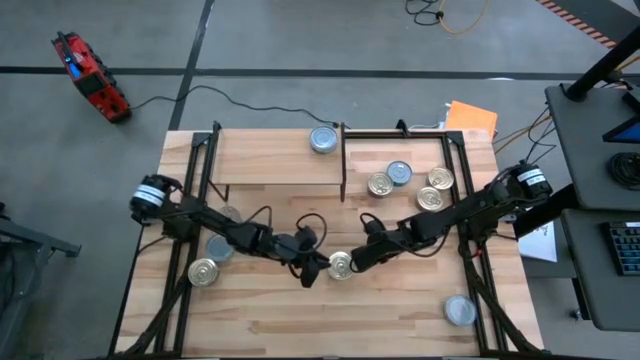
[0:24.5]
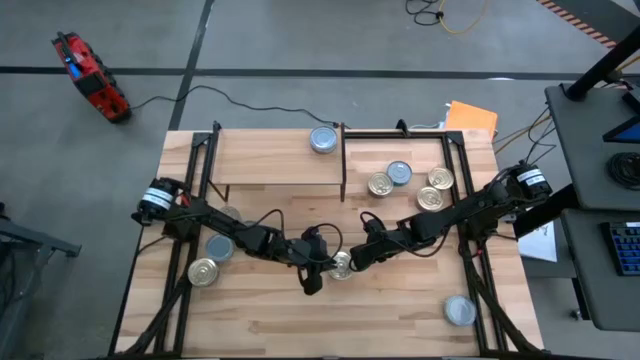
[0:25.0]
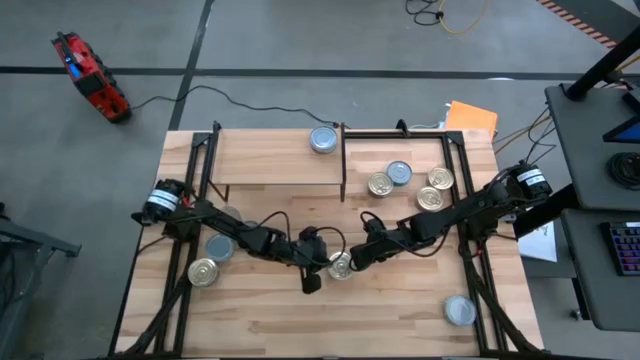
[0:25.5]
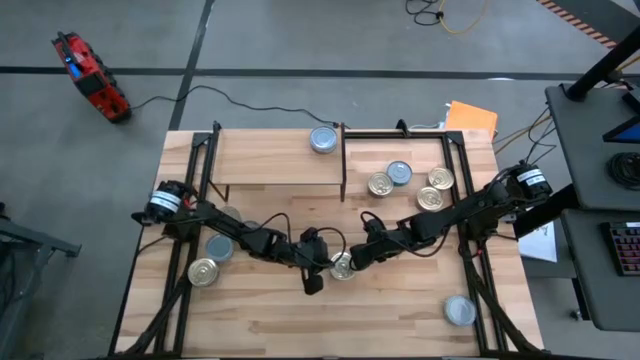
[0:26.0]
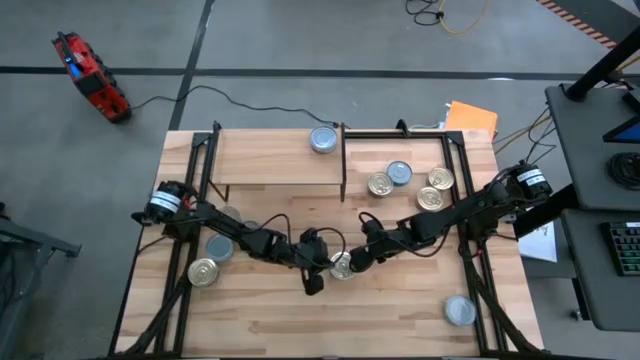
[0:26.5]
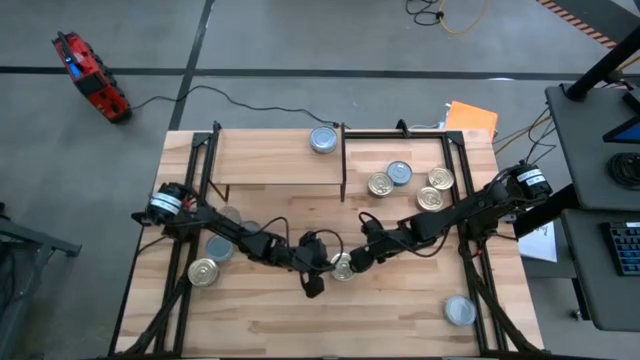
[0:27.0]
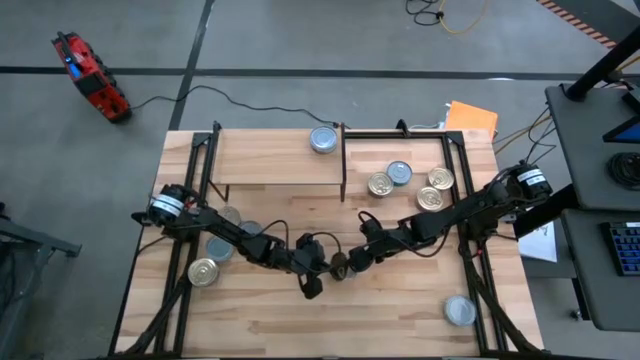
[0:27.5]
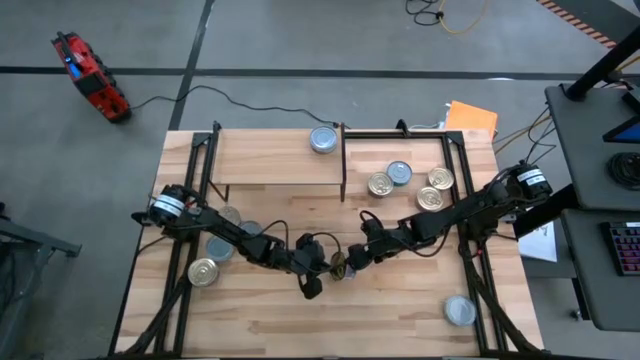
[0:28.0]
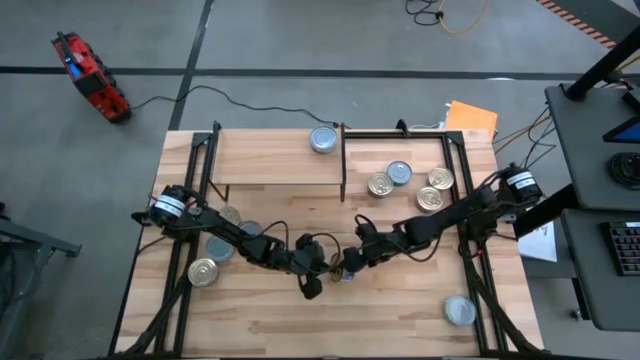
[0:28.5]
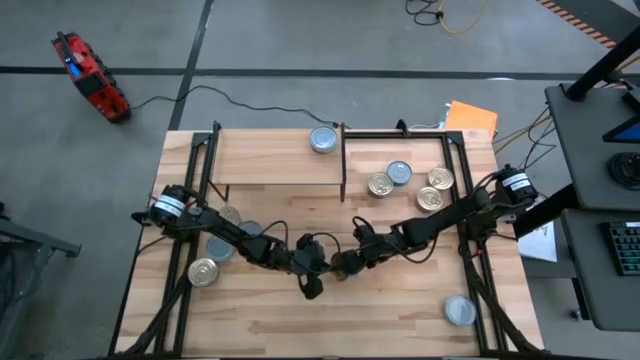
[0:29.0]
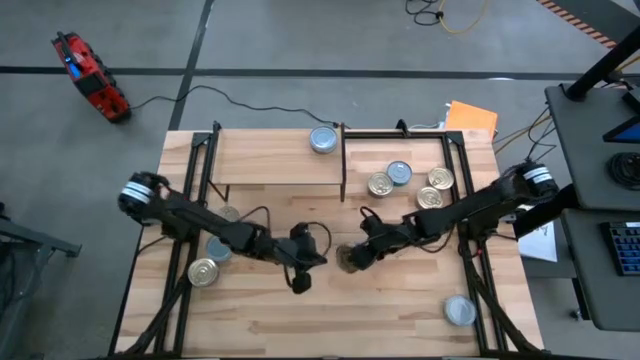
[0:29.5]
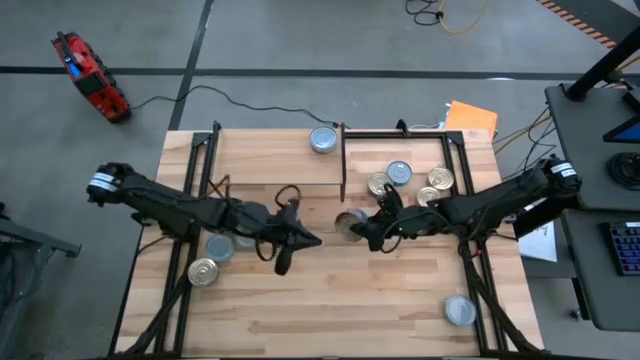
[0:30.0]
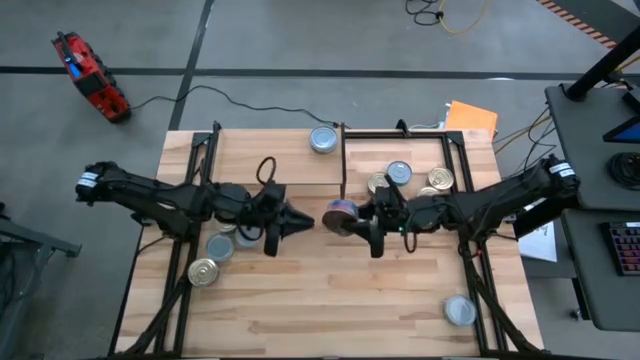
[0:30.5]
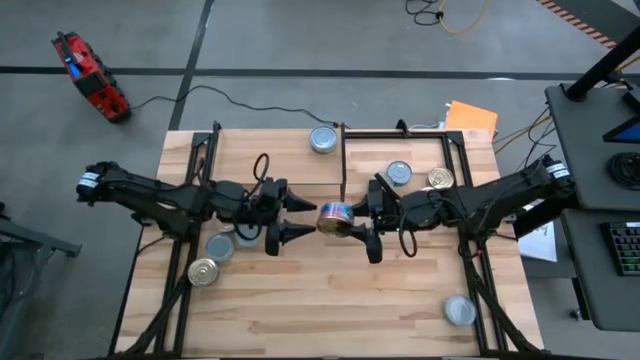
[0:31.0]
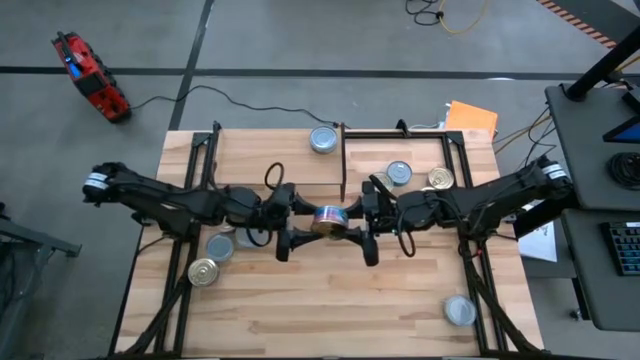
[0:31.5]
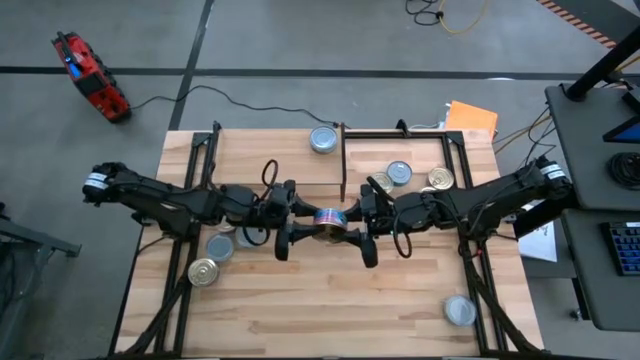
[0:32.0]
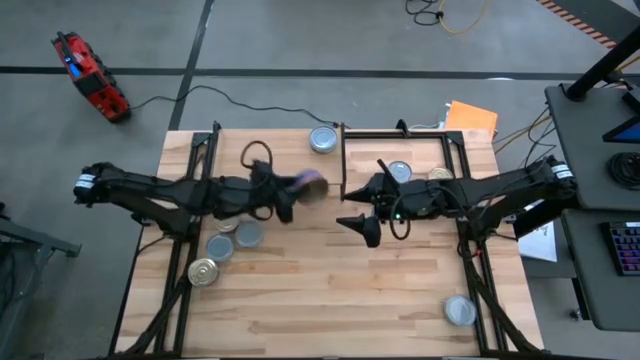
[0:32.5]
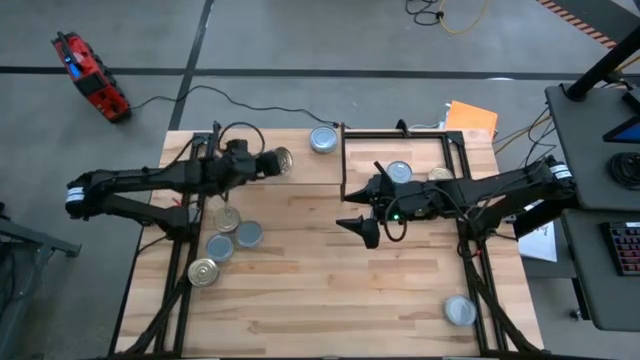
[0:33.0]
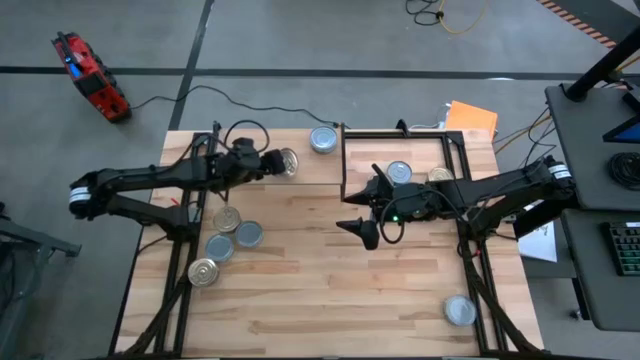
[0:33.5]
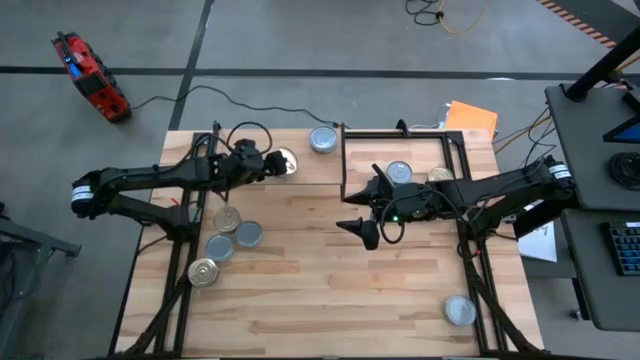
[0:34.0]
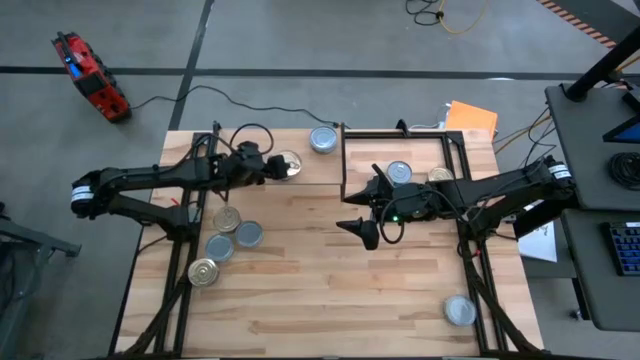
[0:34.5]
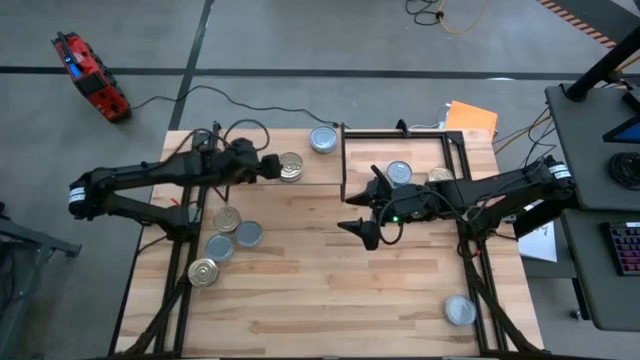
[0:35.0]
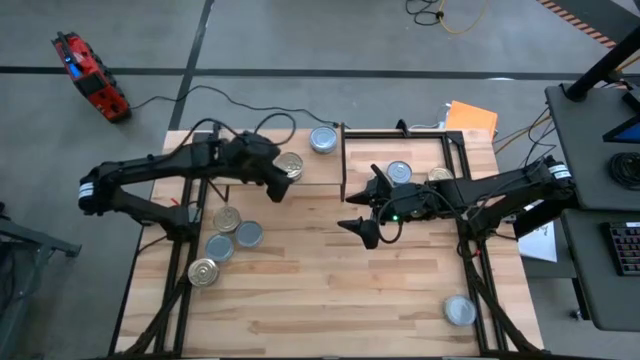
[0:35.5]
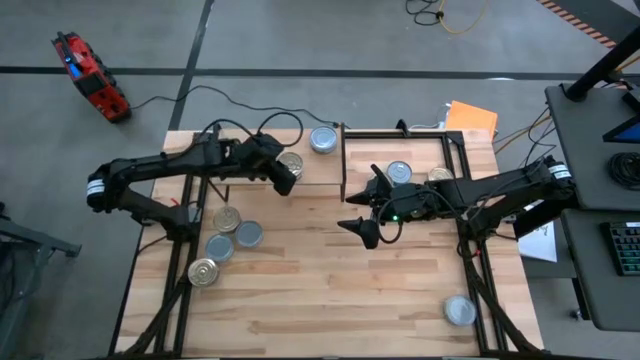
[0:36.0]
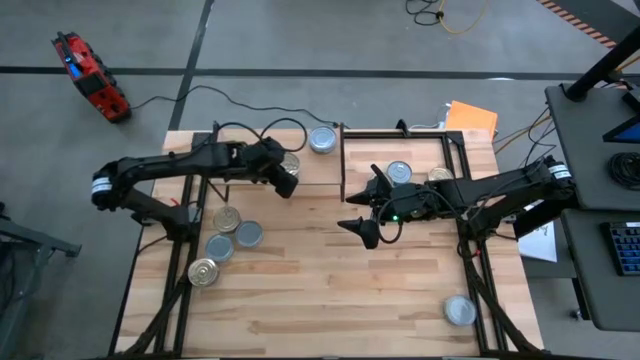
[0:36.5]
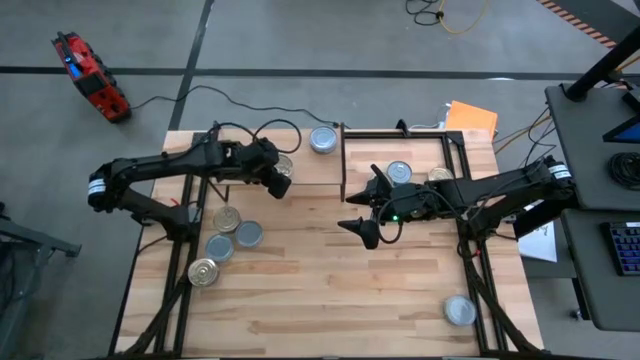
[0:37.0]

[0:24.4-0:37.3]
Task: Stack canned seafood by type on shelf
Put the blue and pink tuna can on the shelf

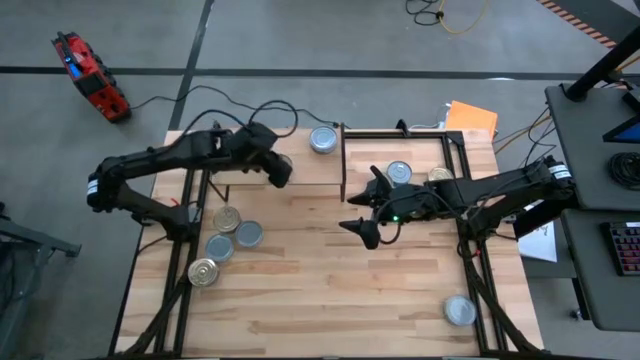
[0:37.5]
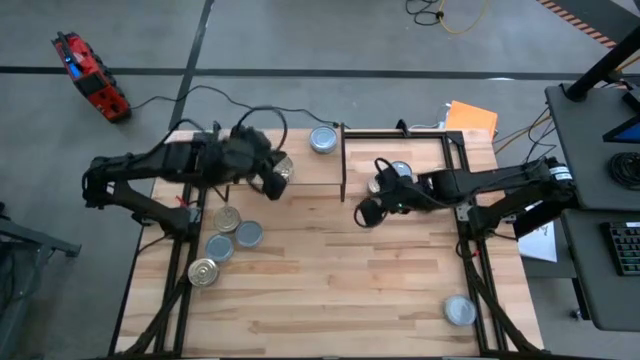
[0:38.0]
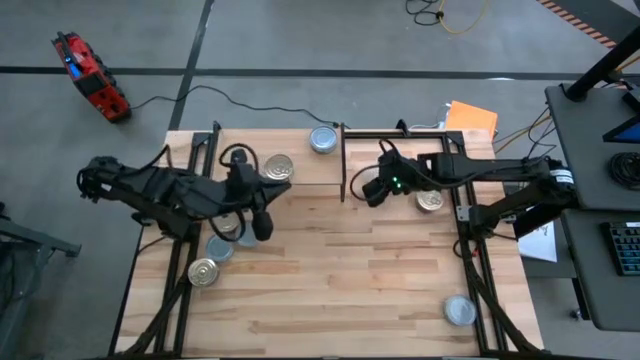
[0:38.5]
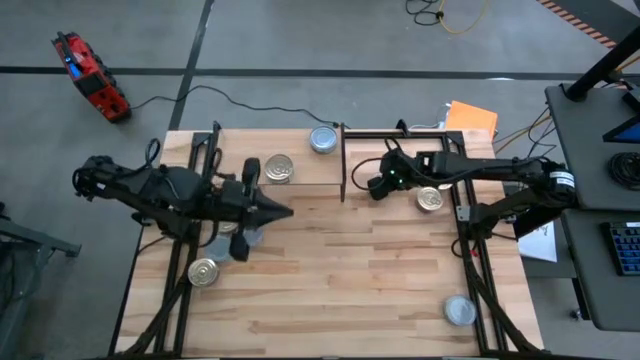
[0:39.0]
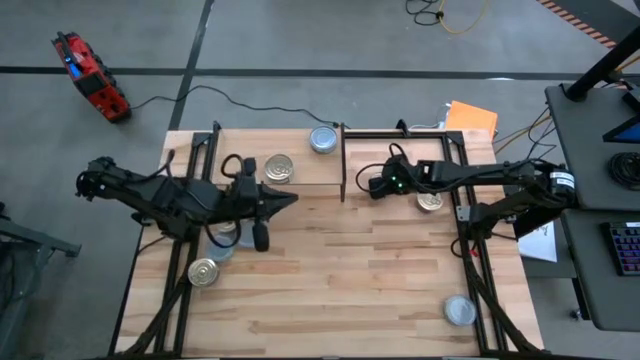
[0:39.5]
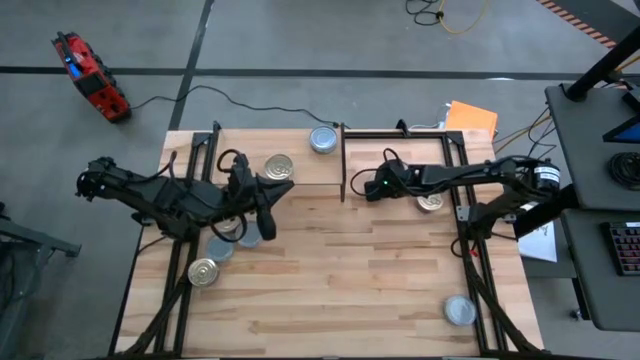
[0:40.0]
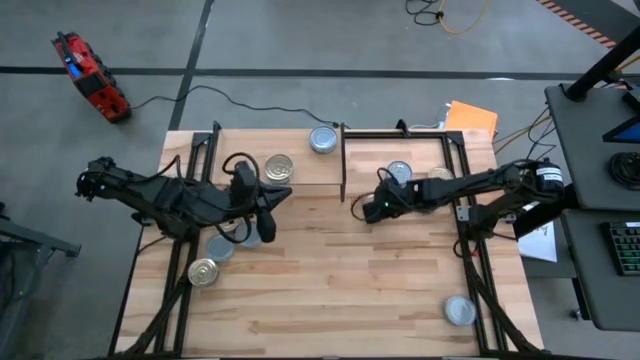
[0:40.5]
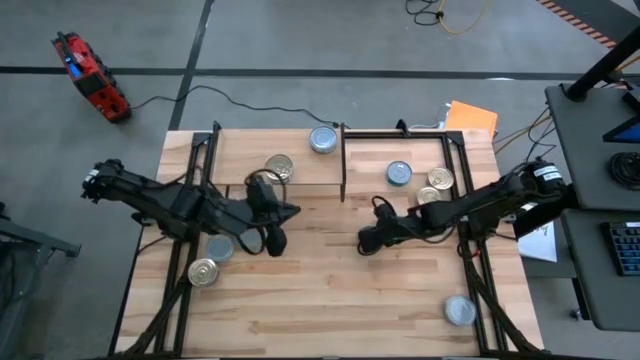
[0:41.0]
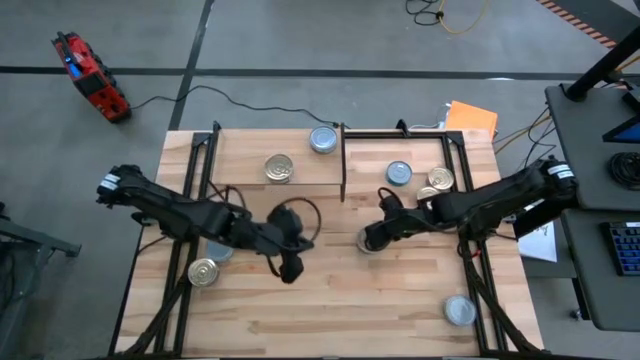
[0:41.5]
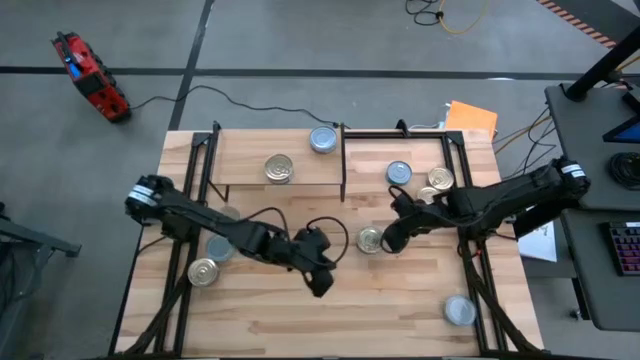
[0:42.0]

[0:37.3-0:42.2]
Move the blue and pink tuna can to the middle right of the table

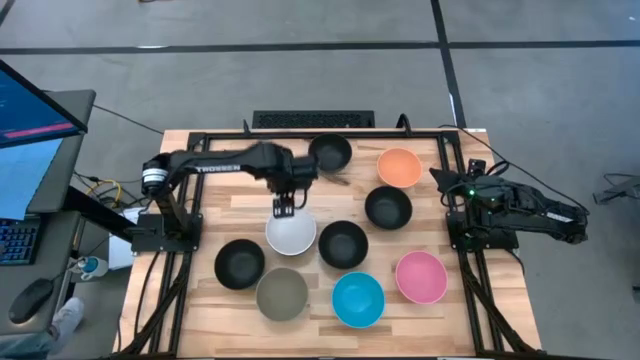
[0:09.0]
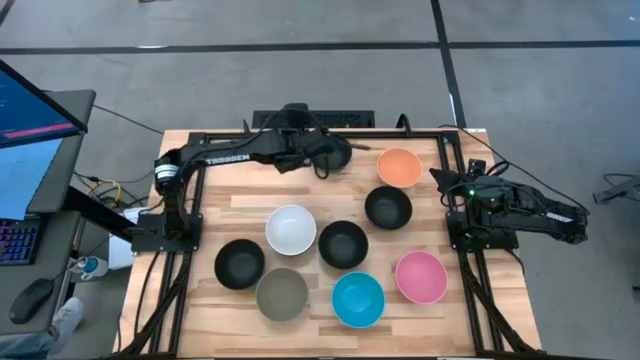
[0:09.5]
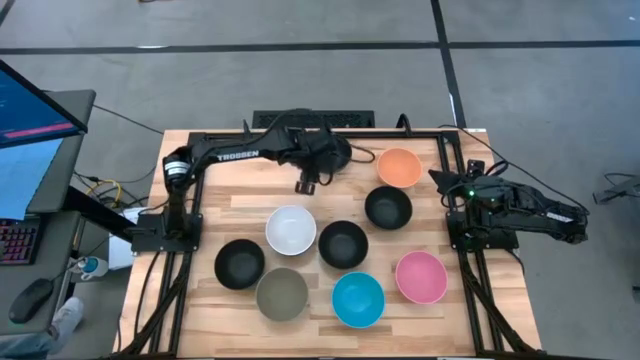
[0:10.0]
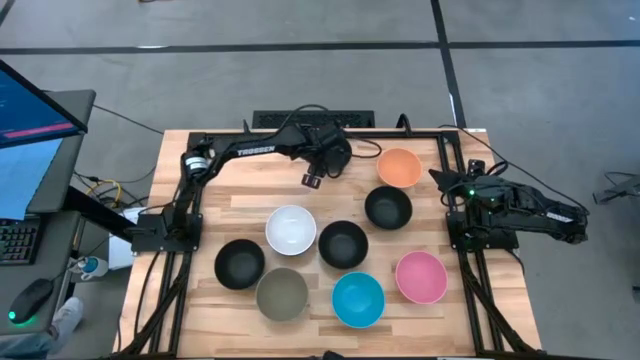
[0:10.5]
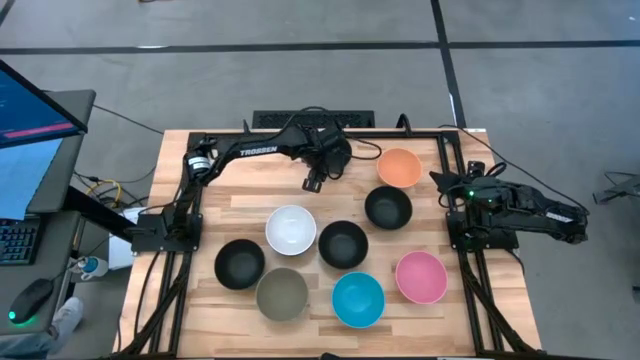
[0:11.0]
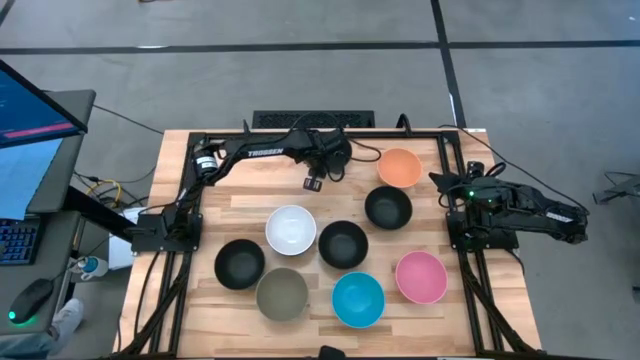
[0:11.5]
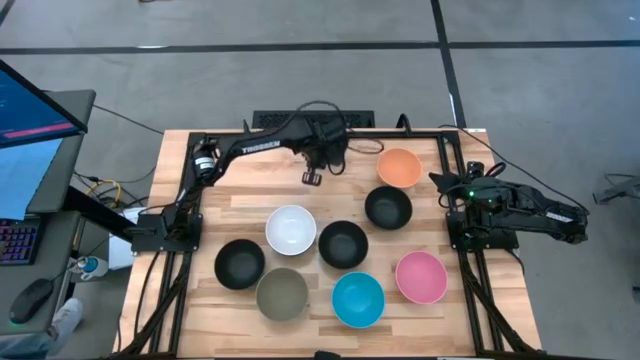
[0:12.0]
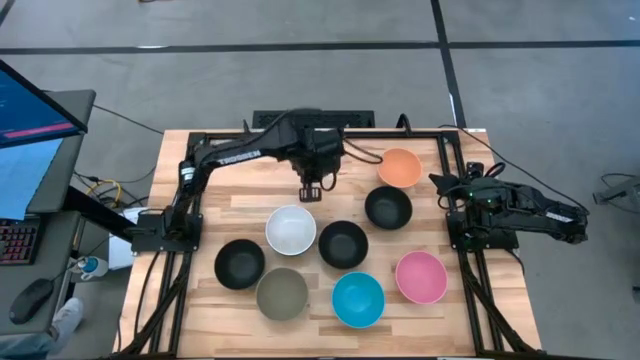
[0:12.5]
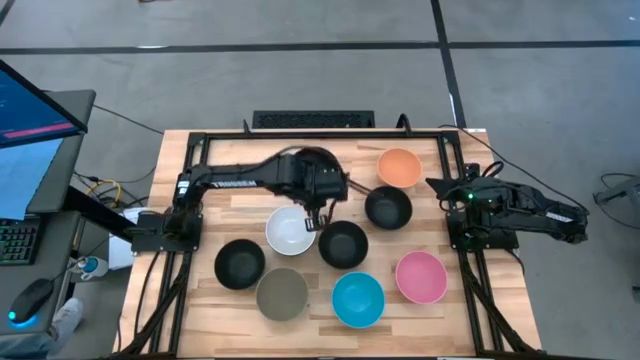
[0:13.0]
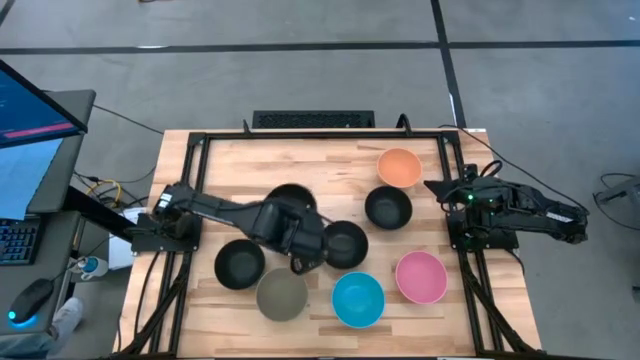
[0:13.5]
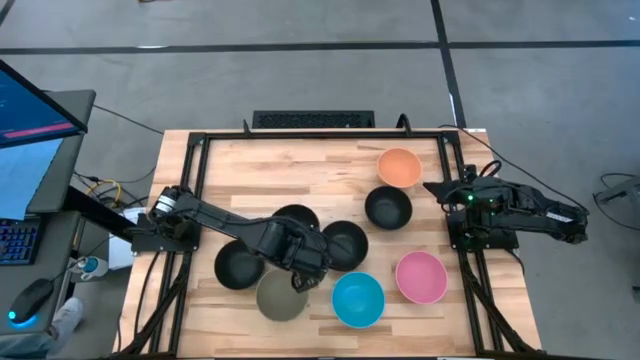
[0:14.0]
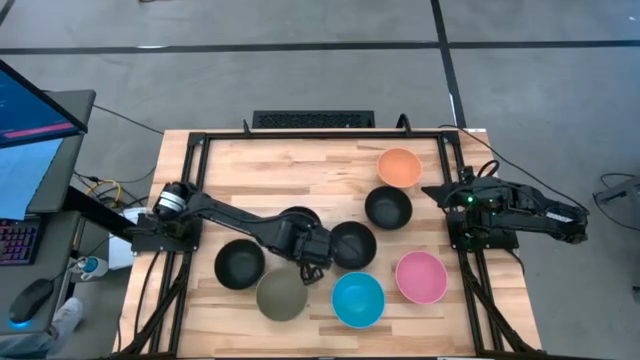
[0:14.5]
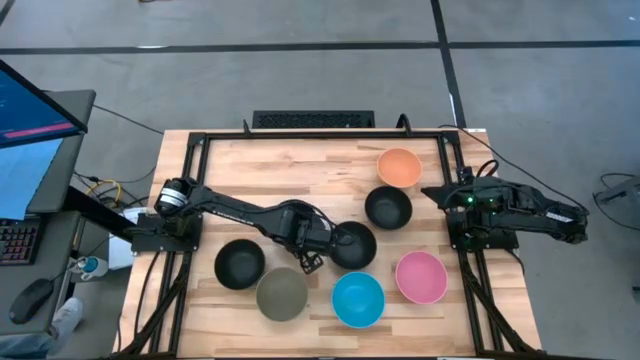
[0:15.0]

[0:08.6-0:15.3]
Task: Nest bowls inside each other
Stack the black bowl on top of the white bowl
